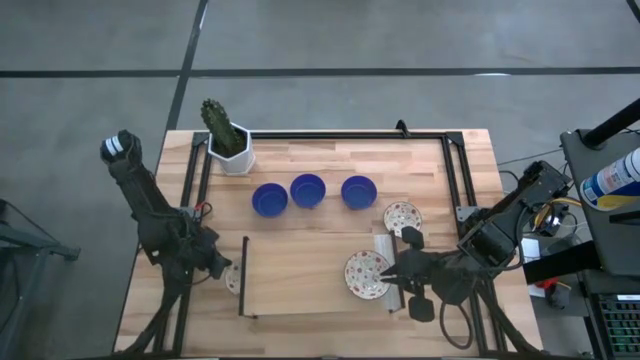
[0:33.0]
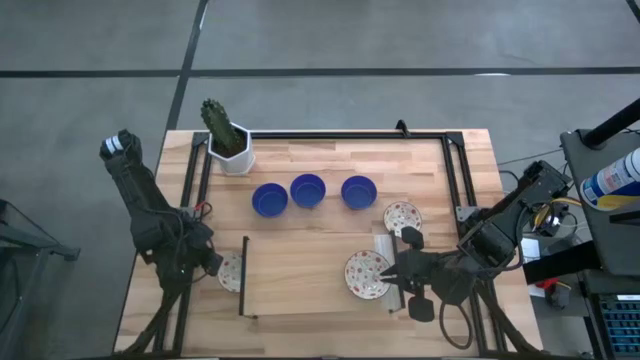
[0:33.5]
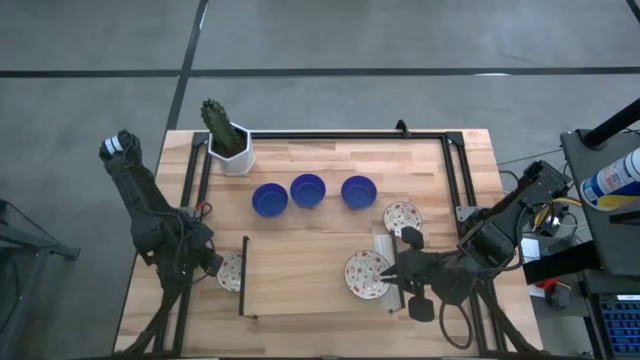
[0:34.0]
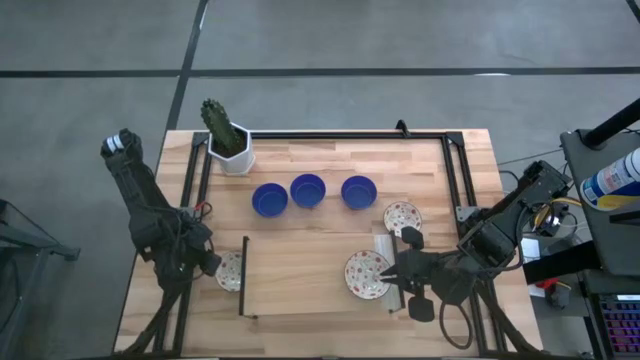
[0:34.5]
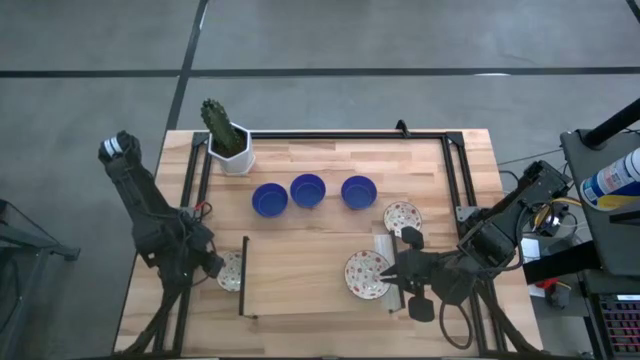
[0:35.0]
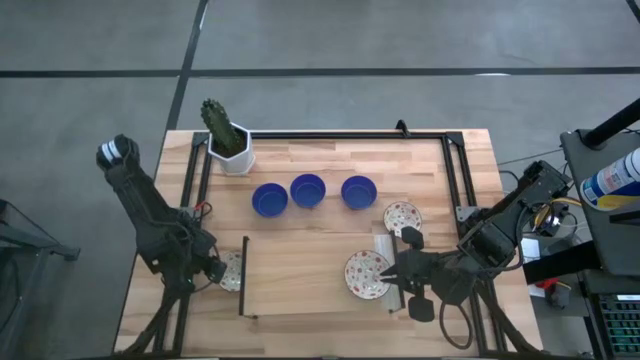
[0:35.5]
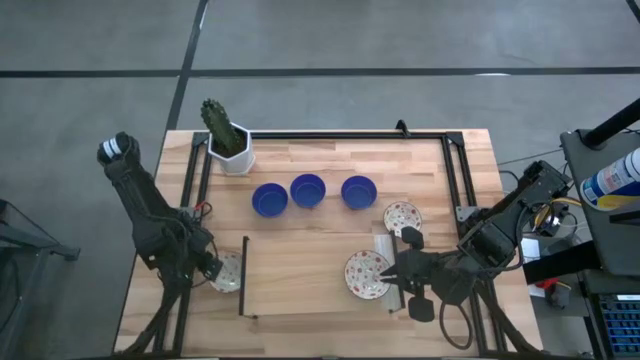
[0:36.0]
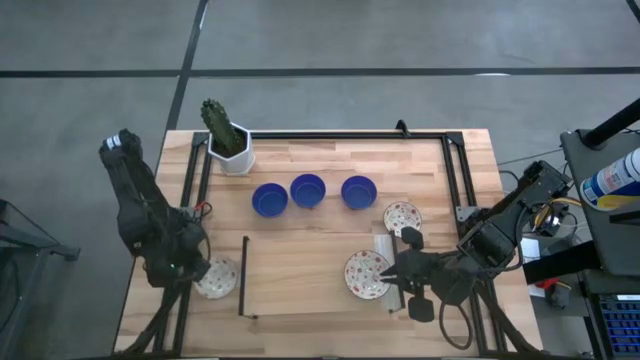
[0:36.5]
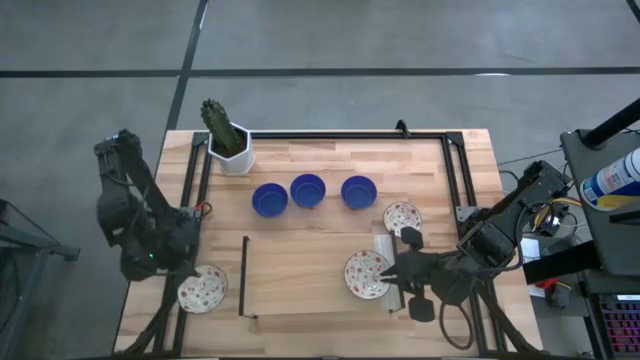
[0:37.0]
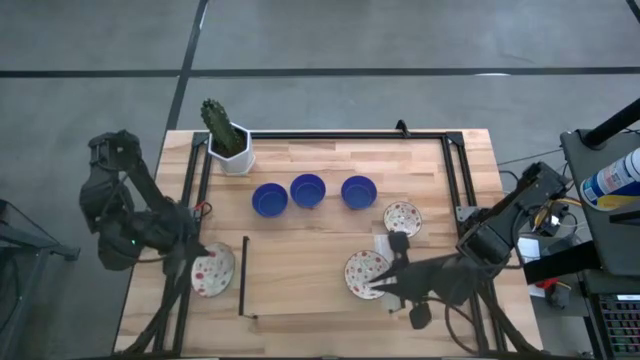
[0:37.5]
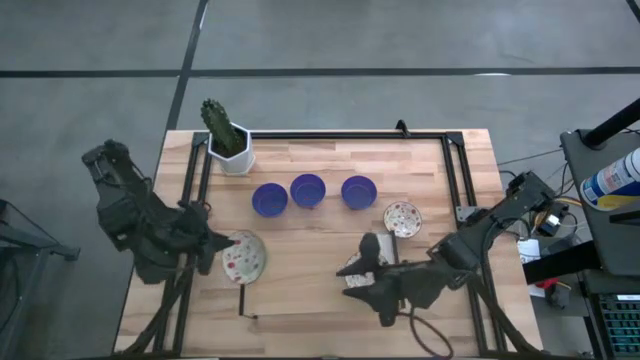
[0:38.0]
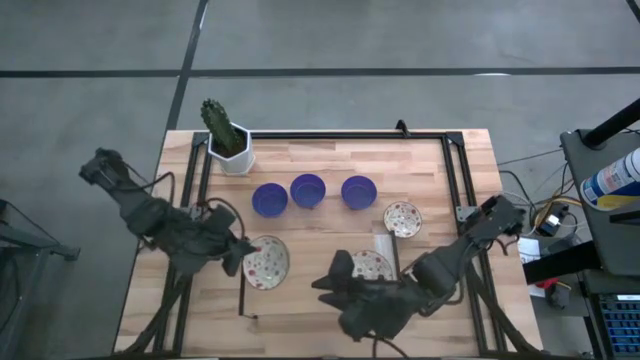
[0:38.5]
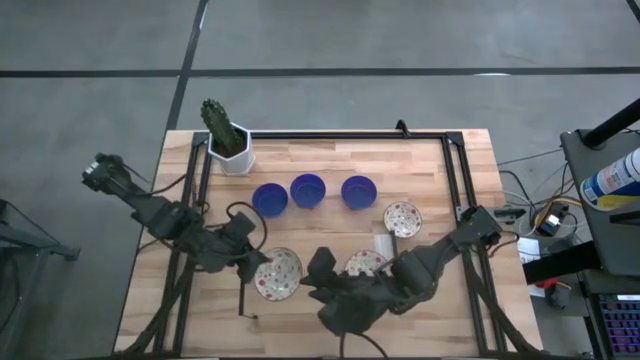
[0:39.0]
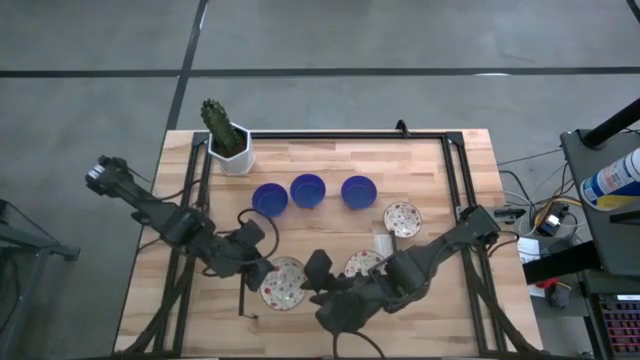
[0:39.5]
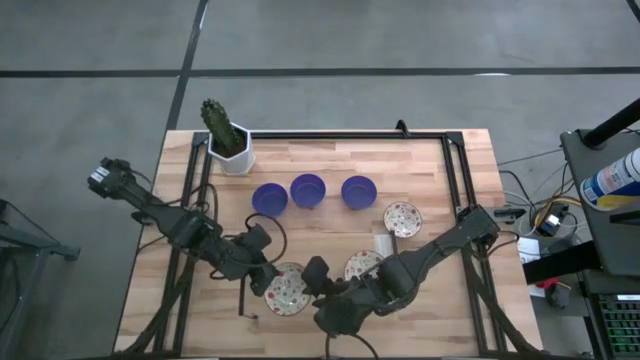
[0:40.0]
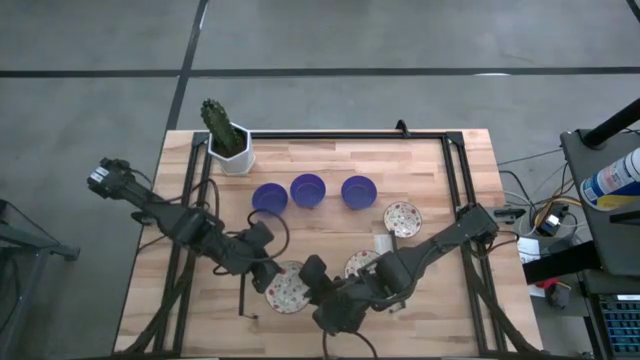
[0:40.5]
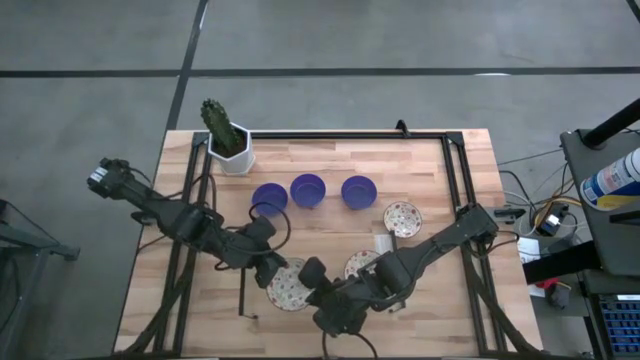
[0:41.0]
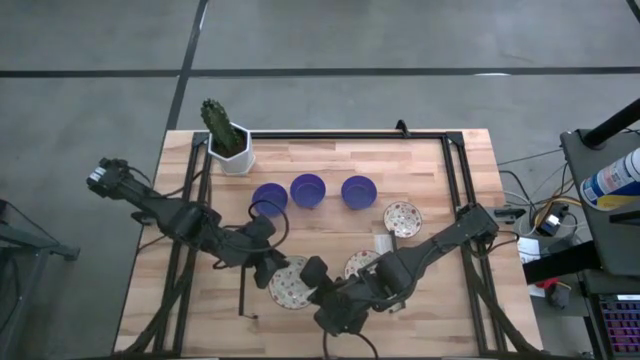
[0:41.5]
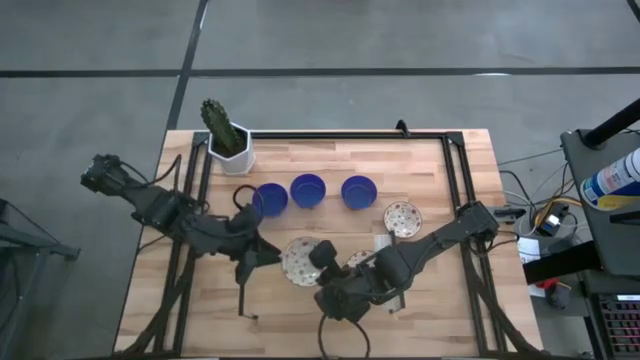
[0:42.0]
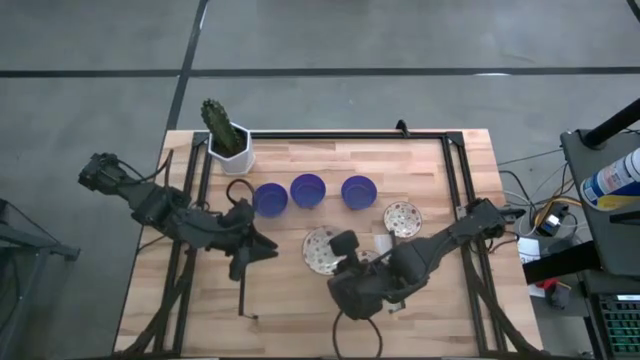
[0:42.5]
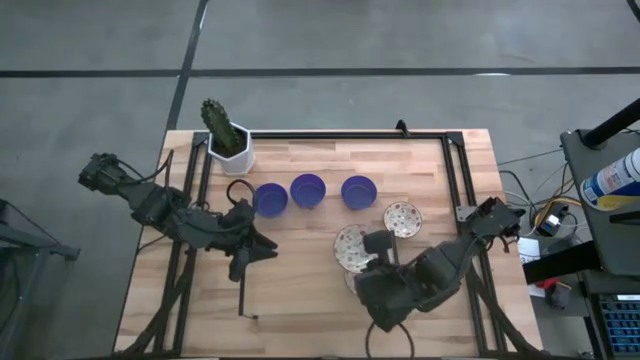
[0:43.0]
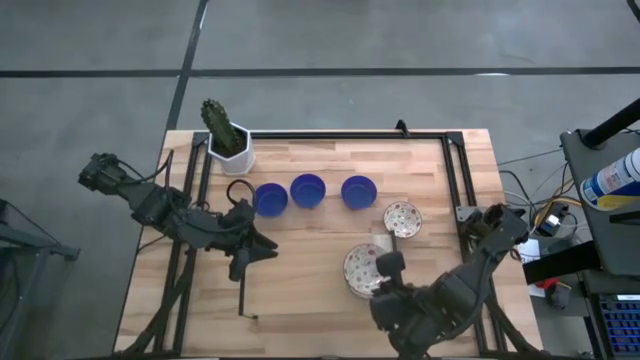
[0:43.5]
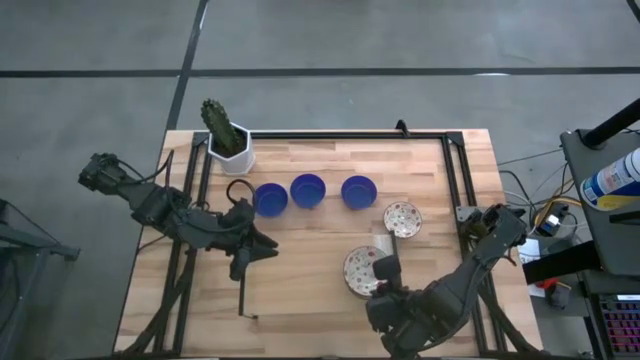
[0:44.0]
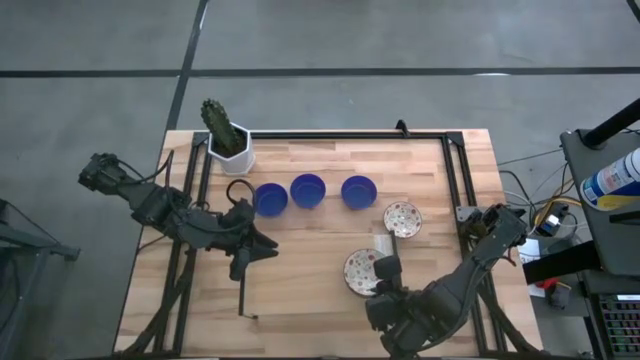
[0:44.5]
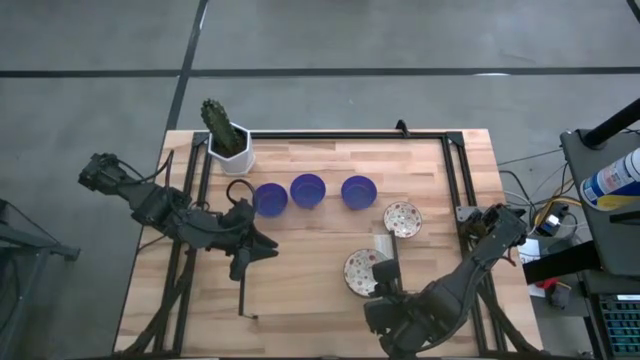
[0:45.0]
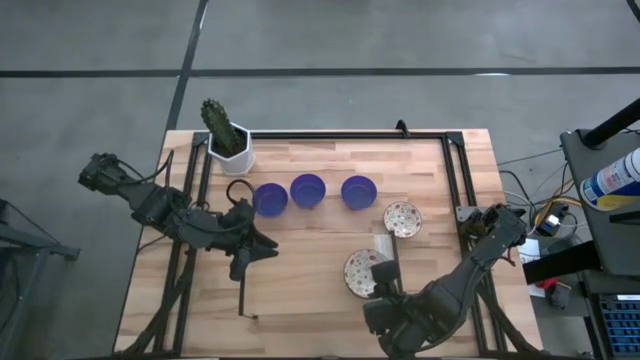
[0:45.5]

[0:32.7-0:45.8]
Task: Pick & Place Mini bowls
Stack the bottom green bowl on the green bowl on the shelf

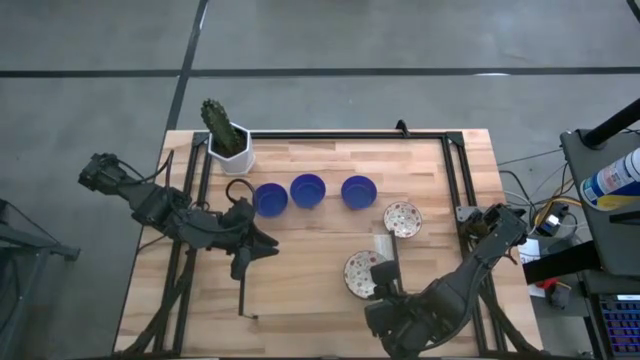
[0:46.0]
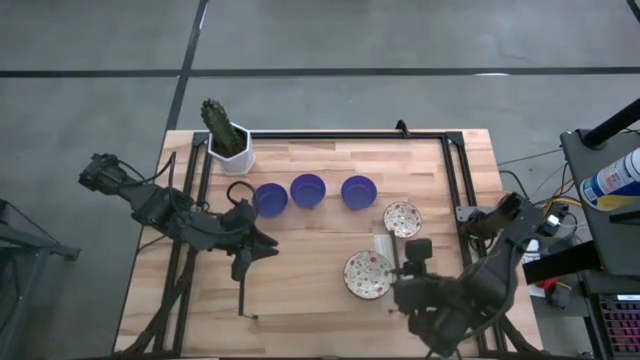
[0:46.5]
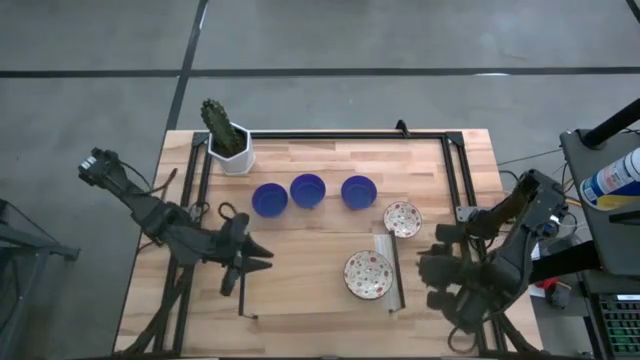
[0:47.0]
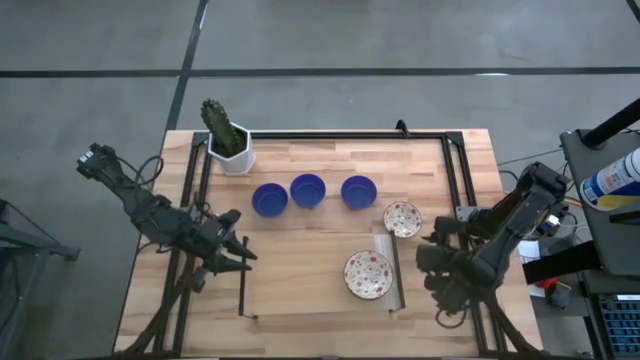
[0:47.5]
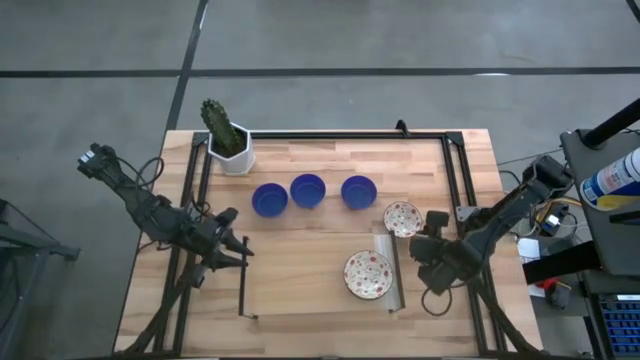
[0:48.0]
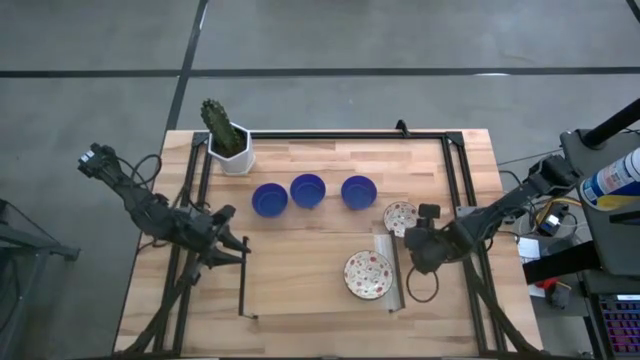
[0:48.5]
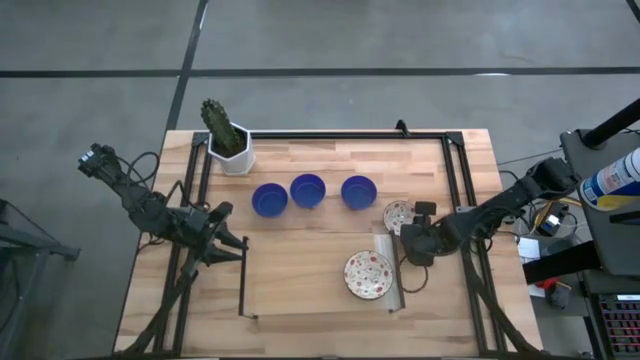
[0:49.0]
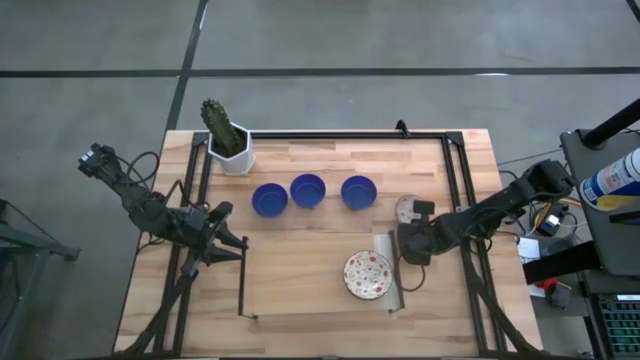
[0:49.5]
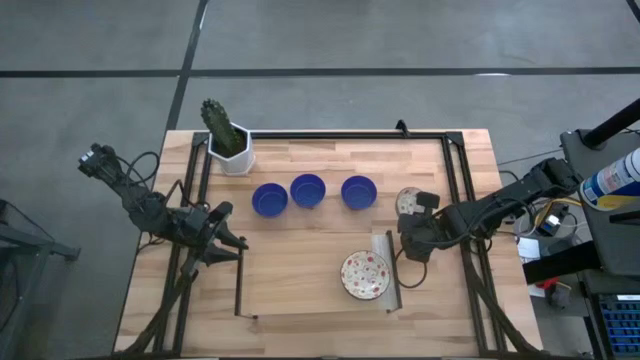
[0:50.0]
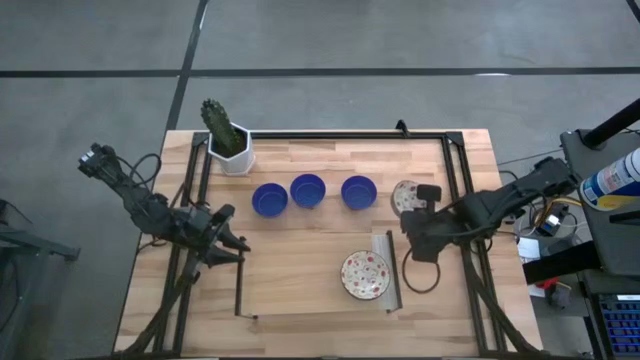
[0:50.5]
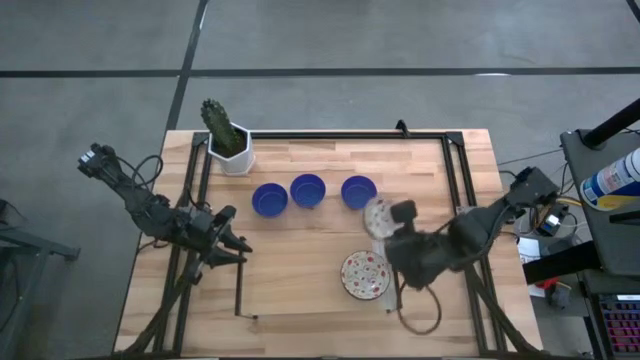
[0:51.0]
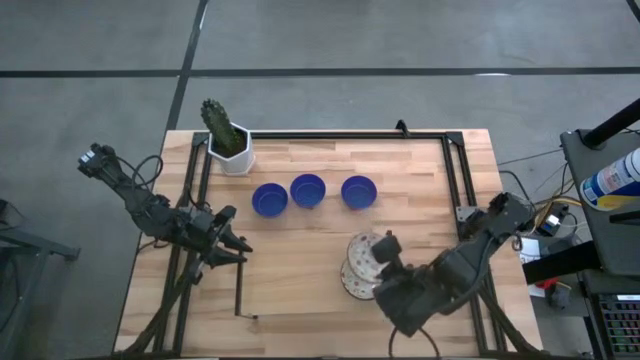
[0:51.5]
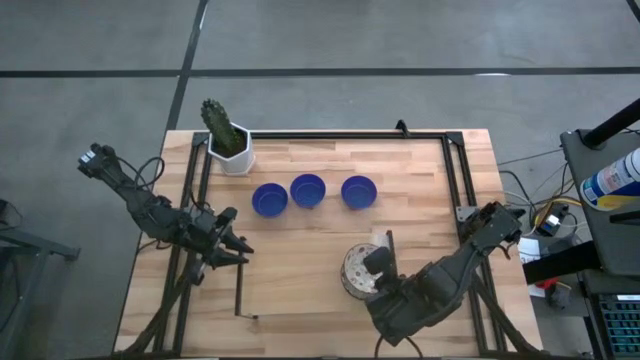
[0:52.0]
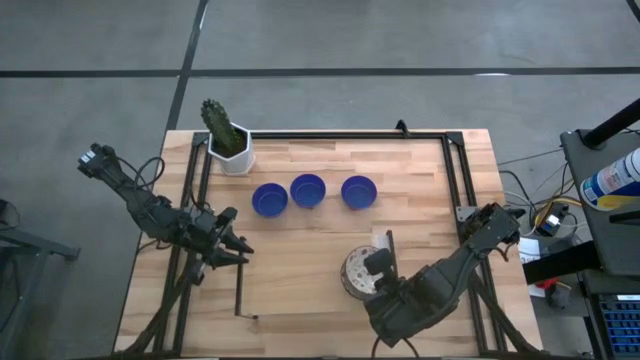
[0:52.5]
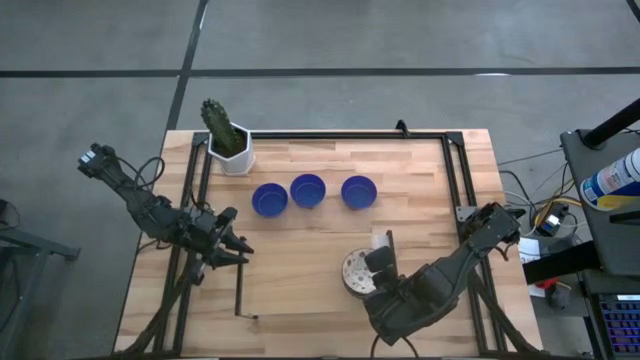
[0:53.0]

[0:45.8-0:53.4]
Stack the green bowl on the green bowl on the shelf
